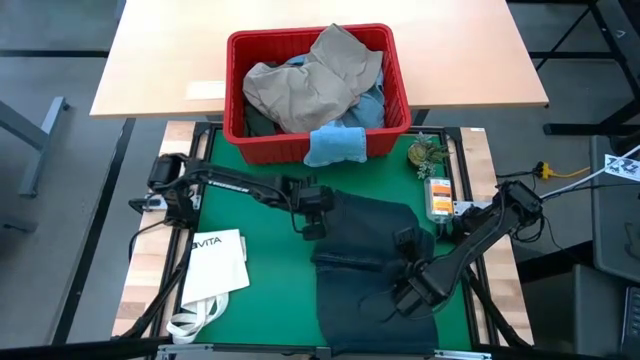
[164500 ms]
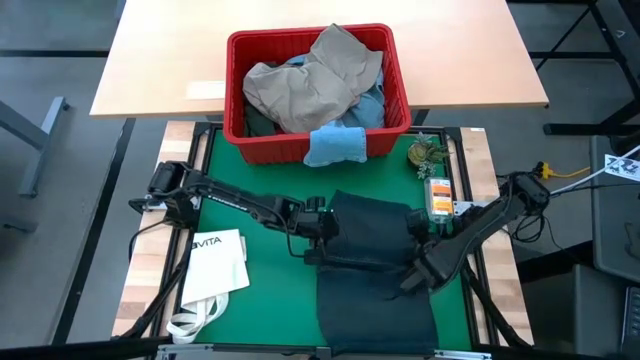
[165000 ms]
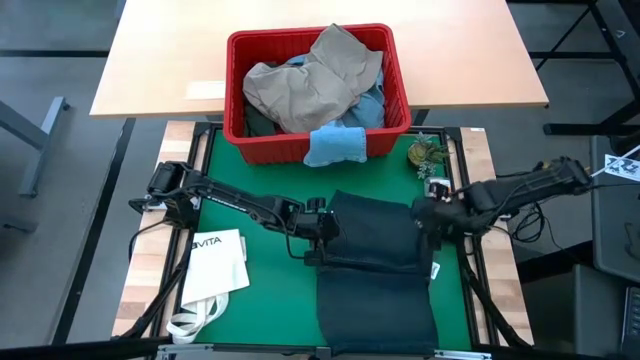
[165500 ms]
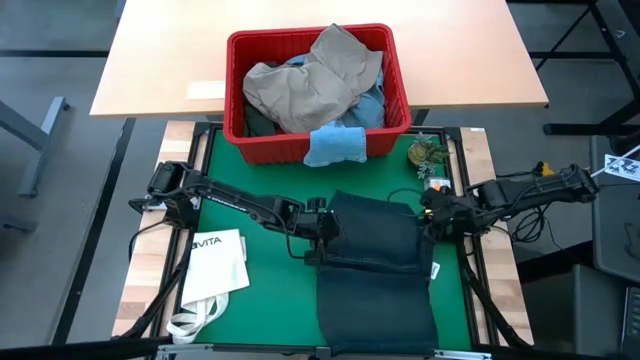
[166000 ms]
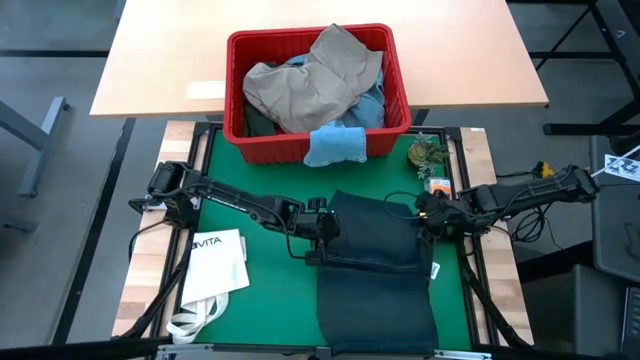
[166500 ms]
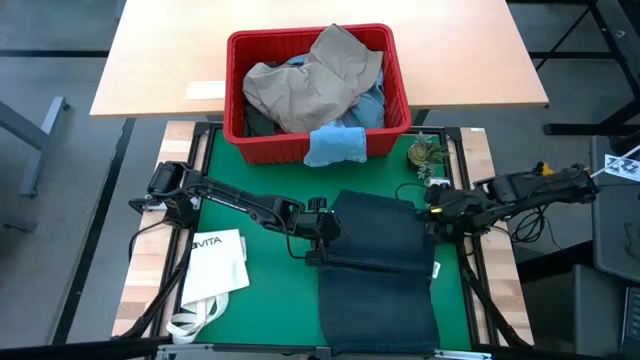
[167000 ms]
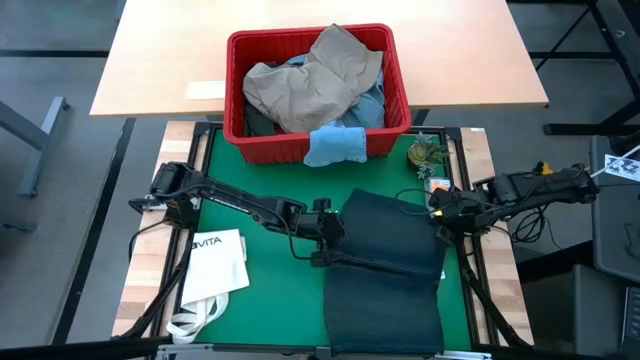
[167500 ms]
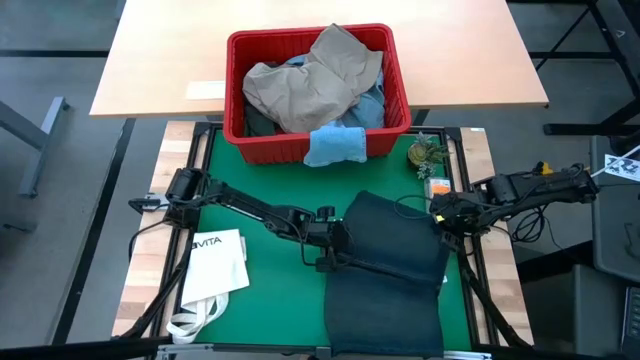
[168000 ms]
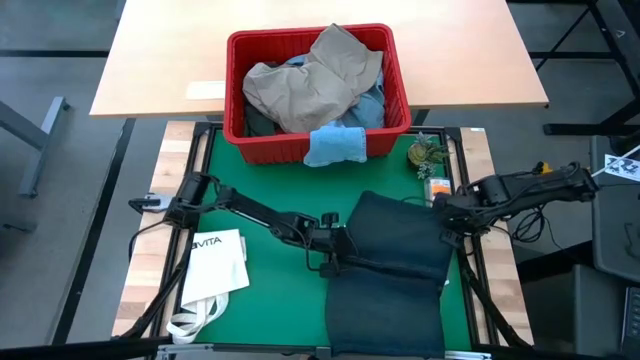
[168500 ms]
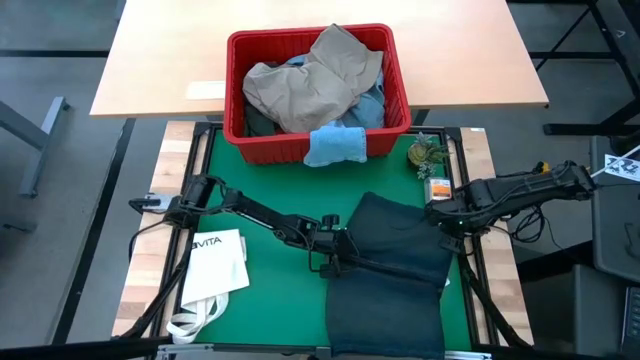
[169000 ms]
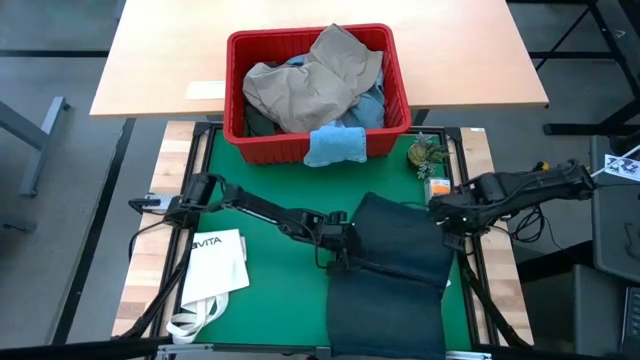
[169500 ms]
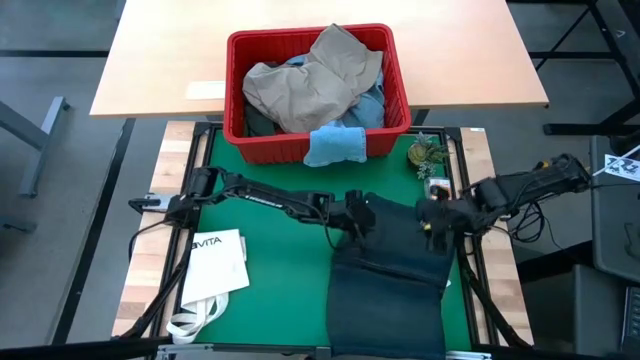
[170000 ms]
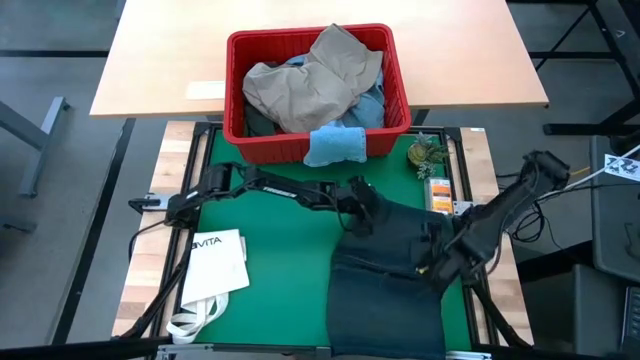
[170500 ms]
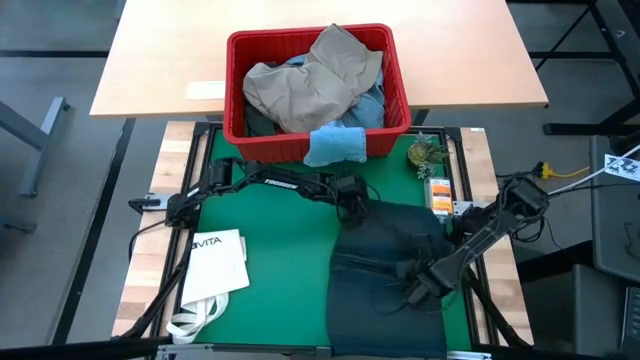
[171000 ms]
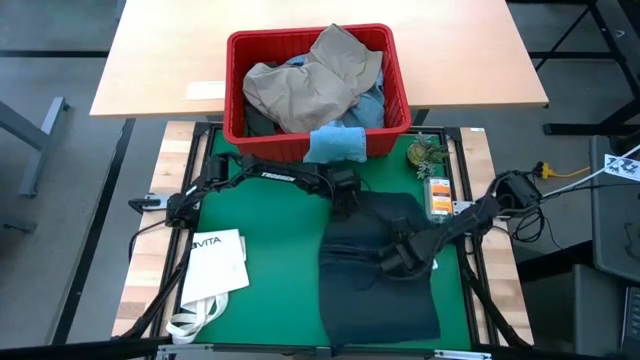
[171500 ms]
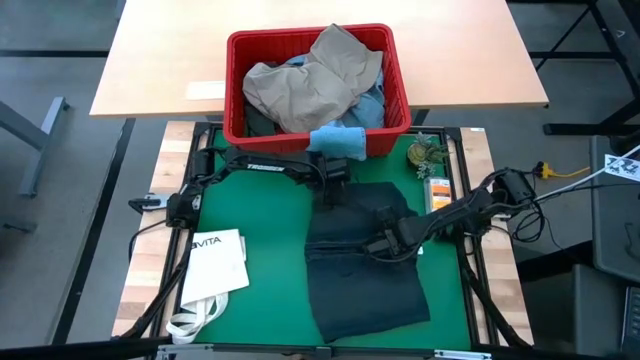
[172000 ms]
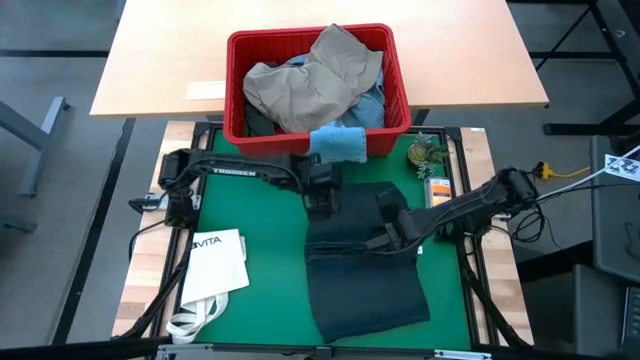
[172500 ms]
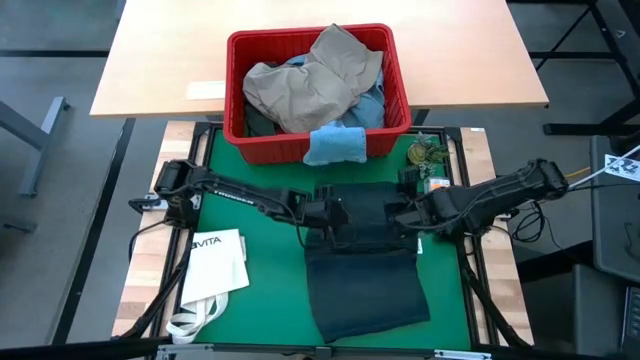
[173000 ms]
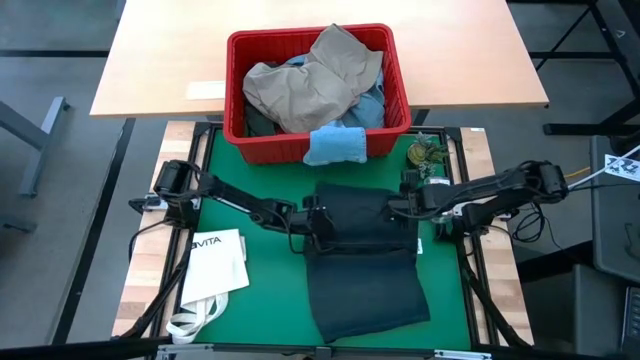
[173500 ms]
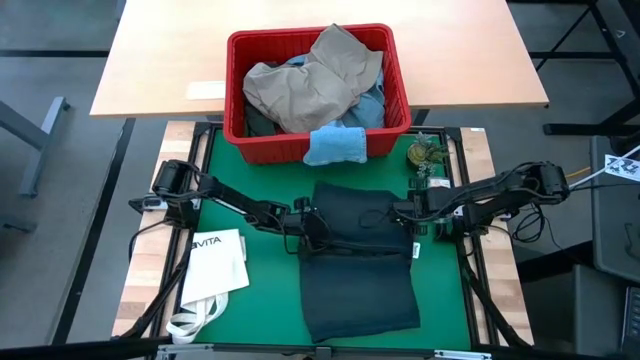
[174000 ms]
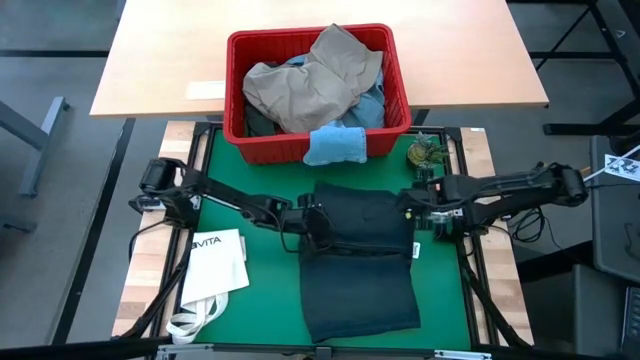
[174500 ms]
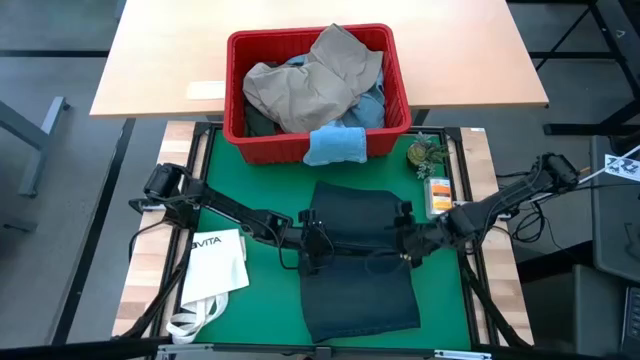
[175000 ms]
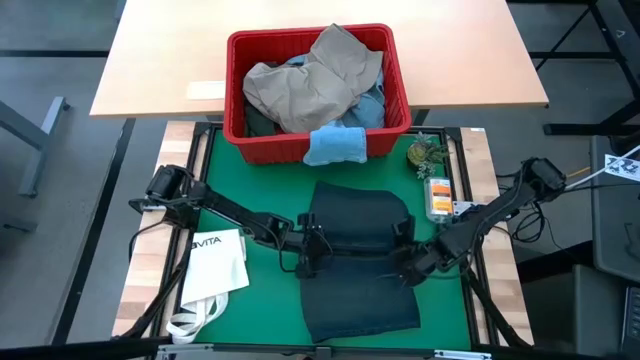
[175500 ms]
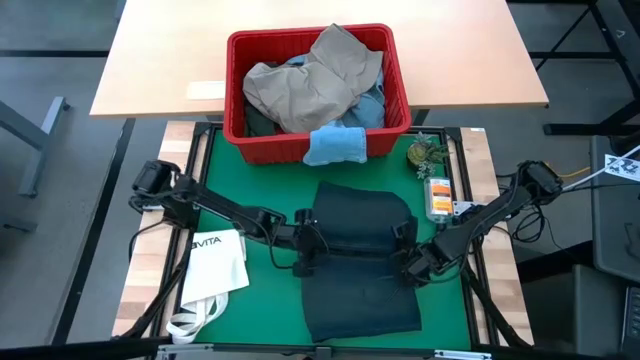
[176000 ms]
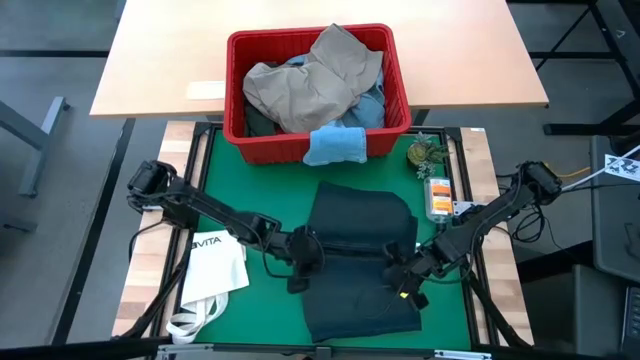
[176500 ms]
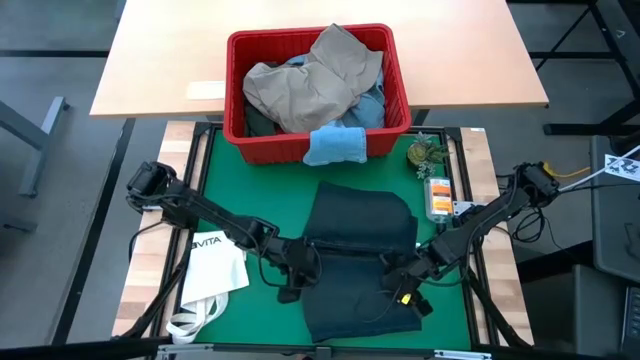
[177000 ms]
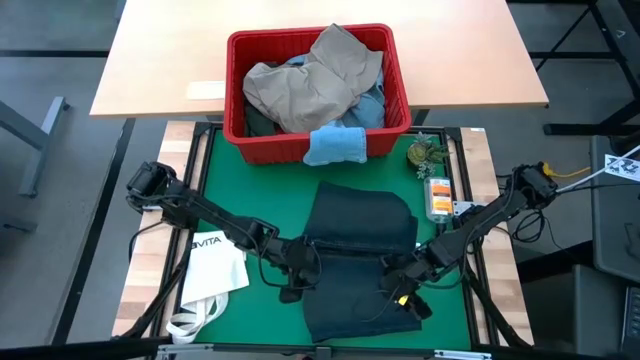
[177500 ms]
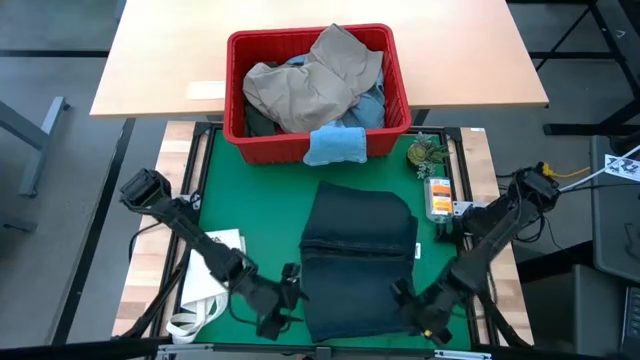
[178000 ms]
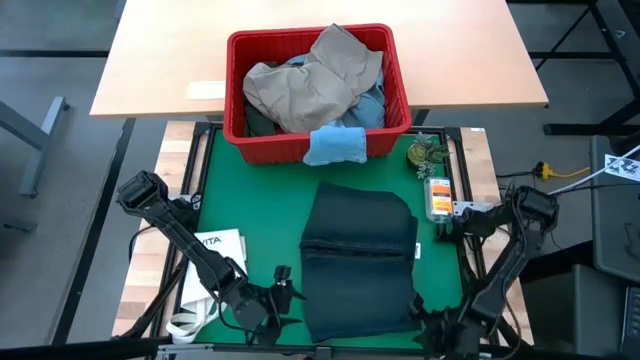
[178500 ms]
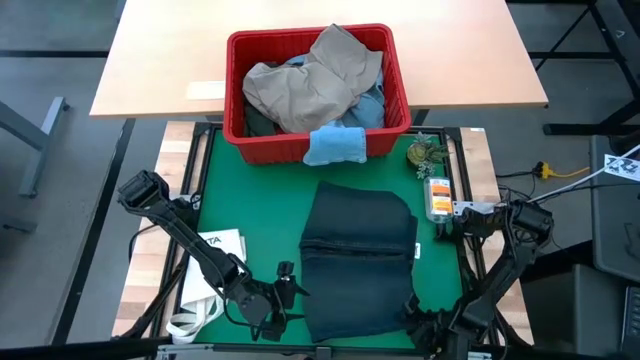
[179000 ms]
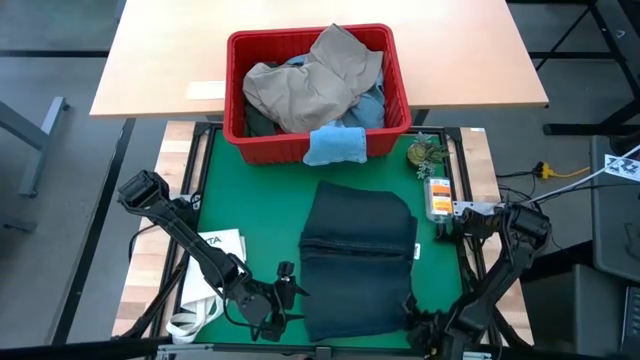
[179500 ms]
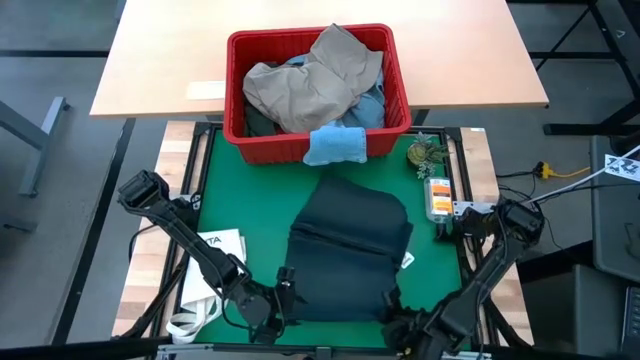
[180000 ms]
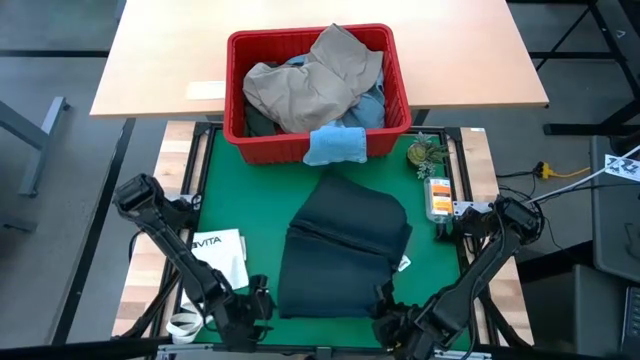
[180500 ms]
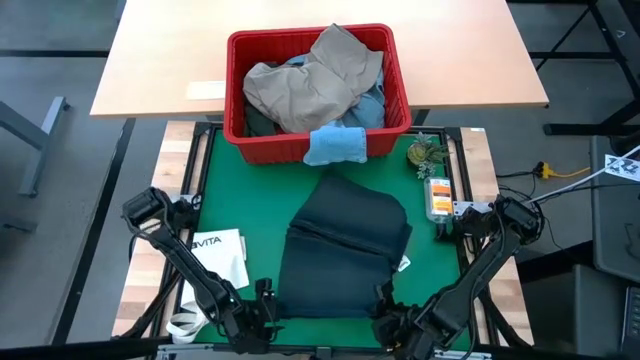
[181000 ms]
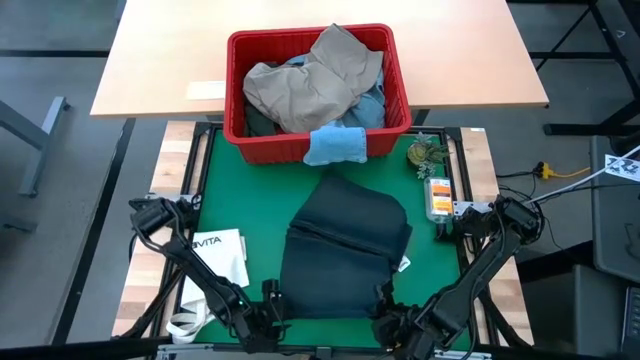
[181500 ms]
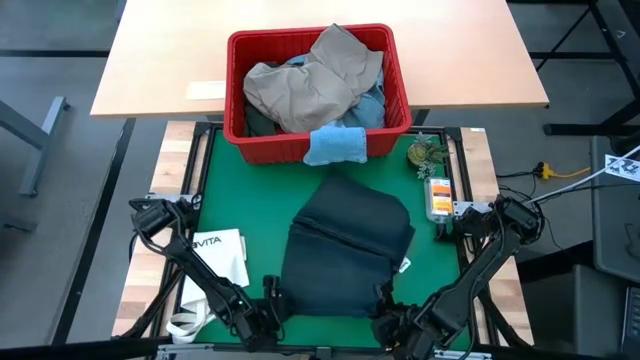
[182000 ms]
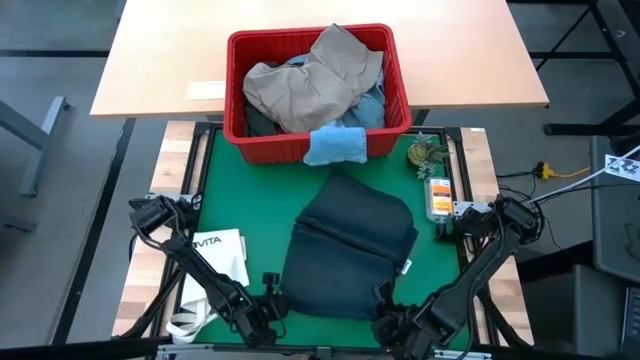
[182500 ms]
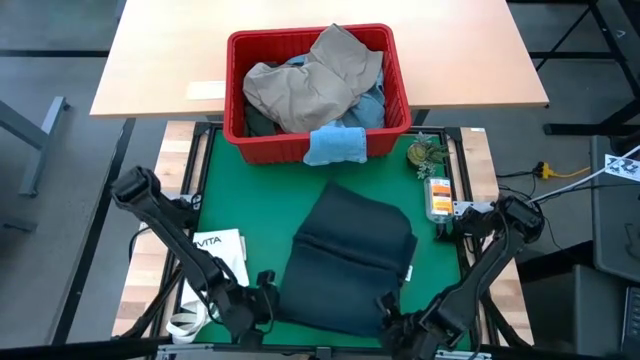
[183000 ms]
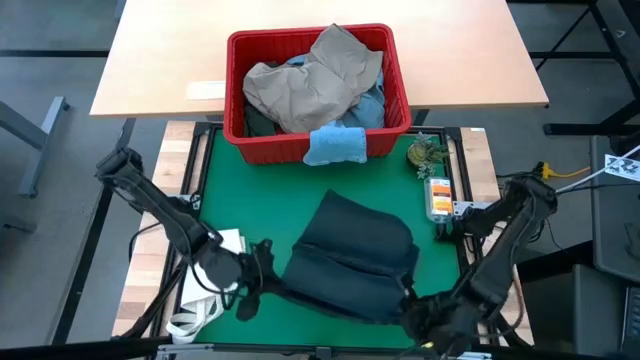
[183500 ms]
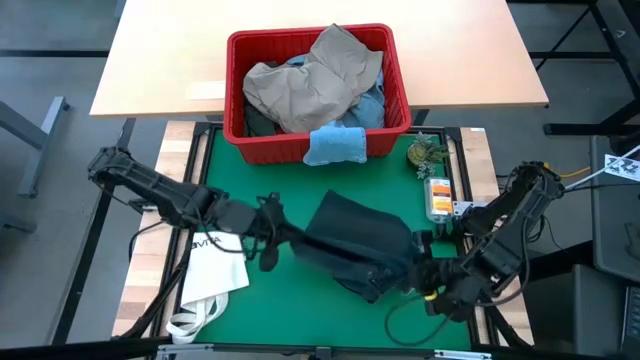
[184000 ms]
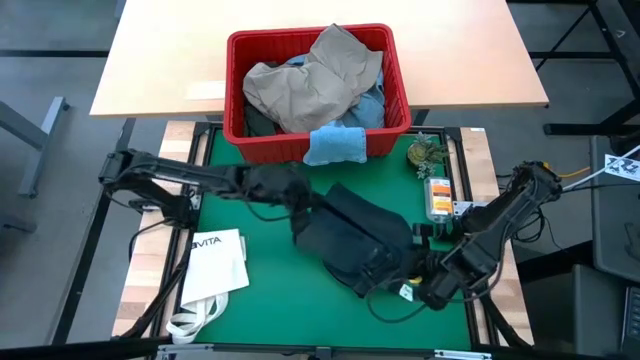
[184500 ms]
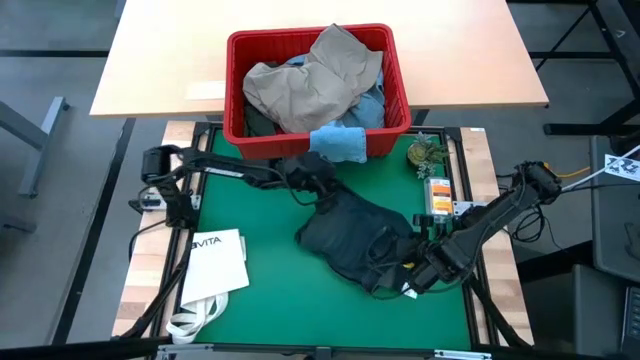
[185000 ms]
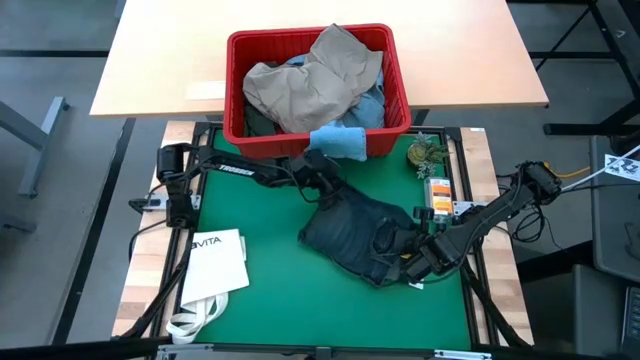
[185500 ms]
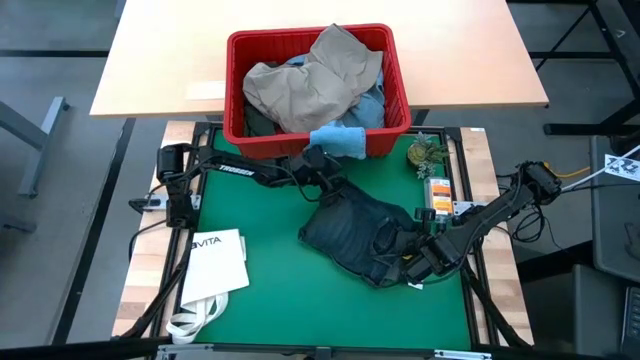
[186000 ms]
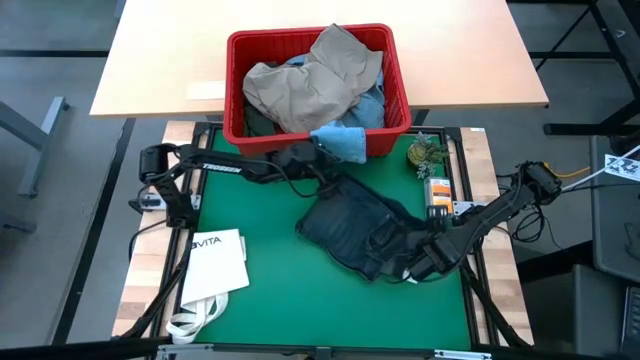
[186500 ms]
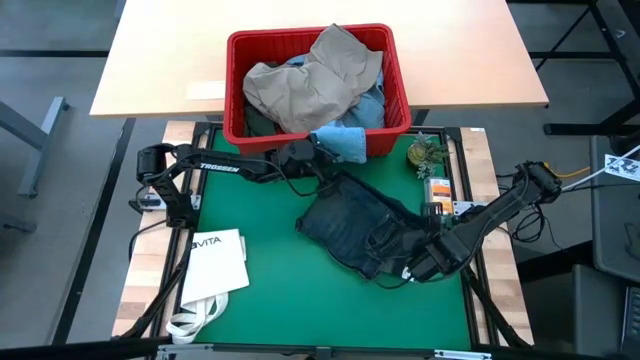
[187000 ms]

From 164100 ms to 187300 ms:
Task: Fold Laundry from Bin
Fold the dark blue pants
